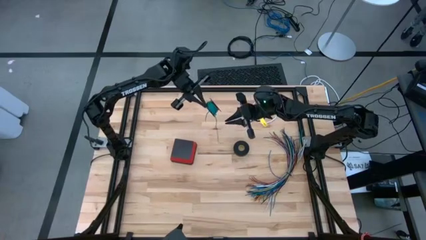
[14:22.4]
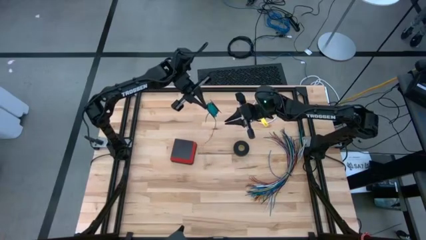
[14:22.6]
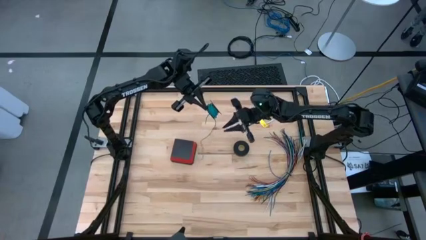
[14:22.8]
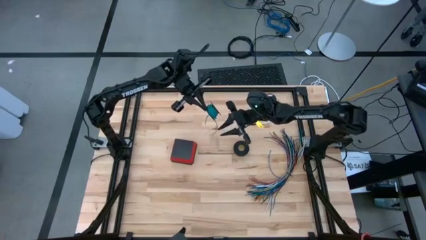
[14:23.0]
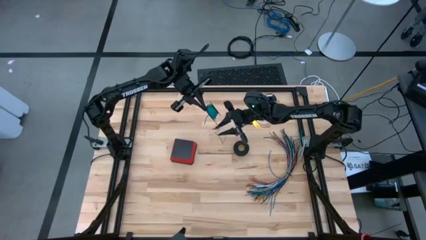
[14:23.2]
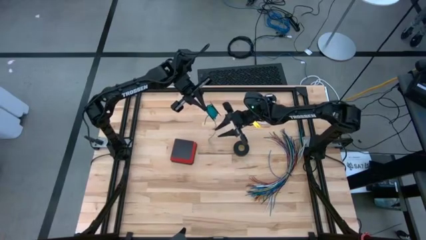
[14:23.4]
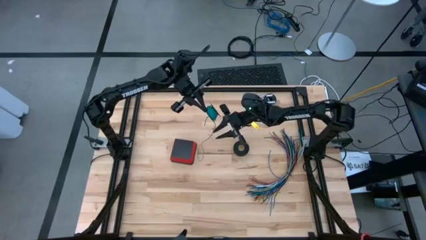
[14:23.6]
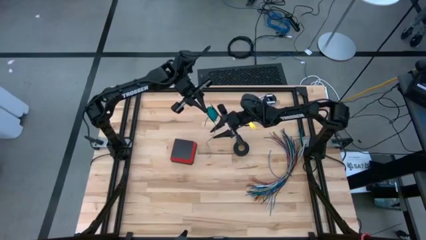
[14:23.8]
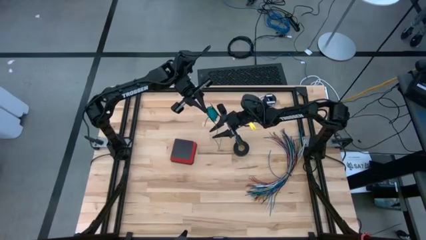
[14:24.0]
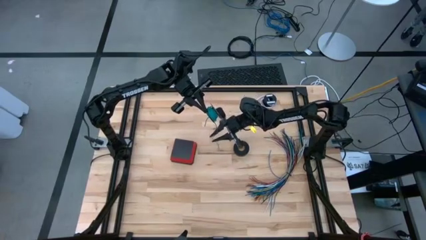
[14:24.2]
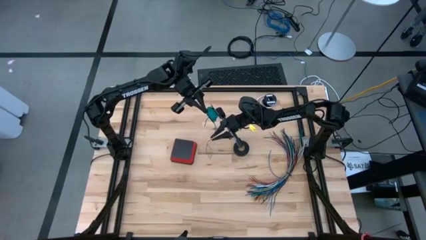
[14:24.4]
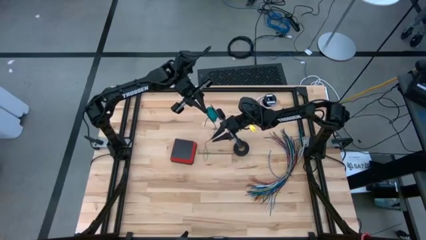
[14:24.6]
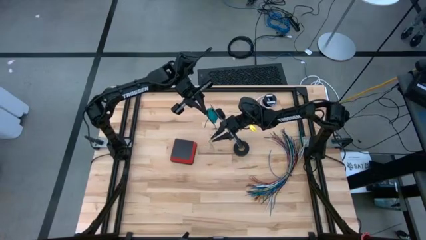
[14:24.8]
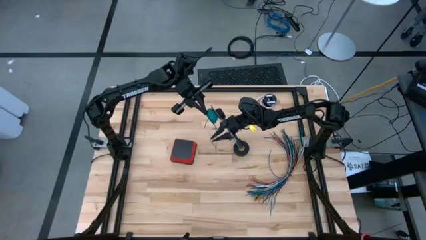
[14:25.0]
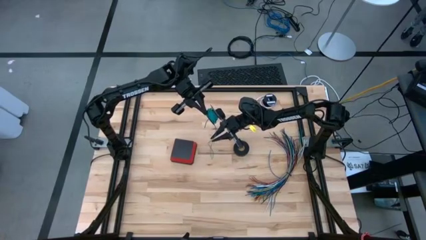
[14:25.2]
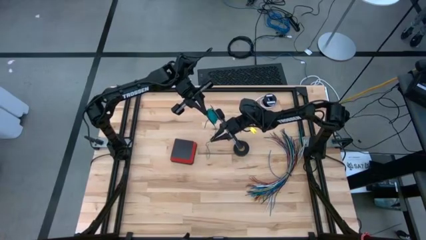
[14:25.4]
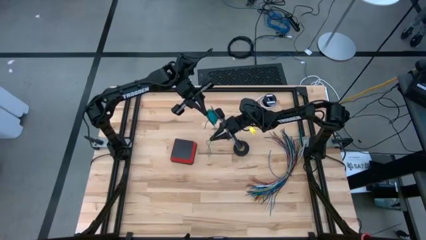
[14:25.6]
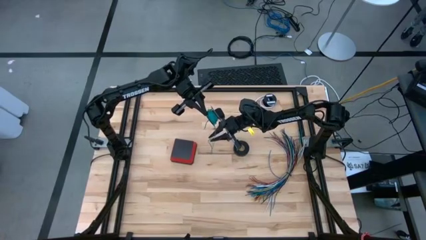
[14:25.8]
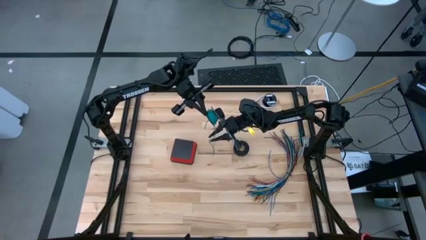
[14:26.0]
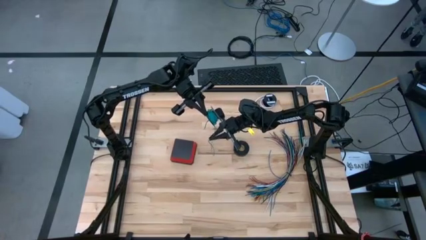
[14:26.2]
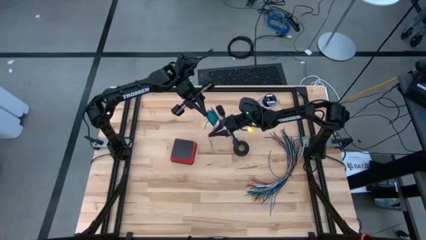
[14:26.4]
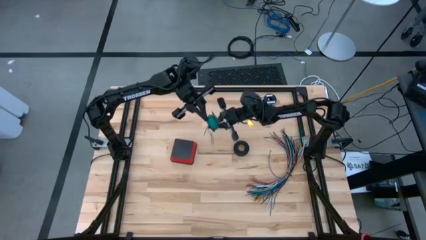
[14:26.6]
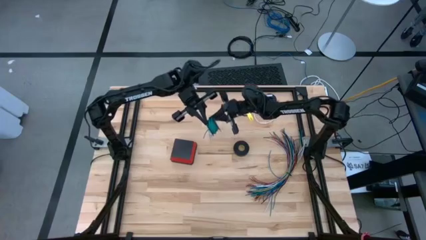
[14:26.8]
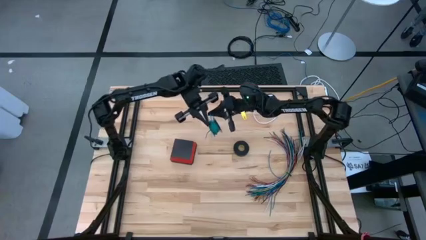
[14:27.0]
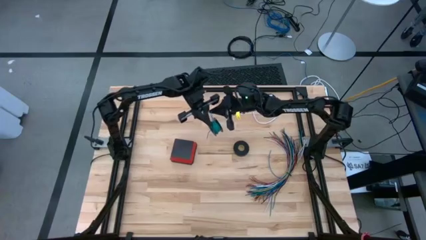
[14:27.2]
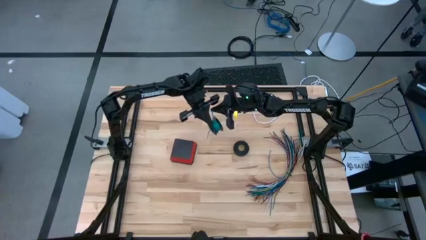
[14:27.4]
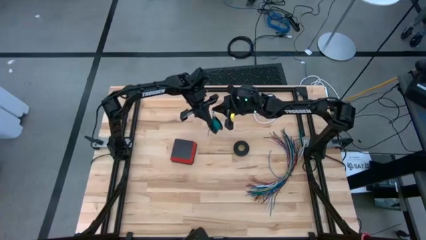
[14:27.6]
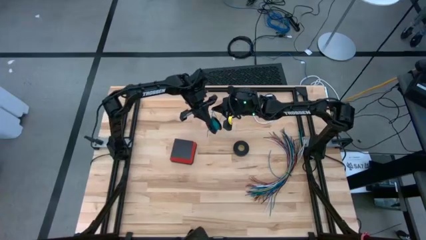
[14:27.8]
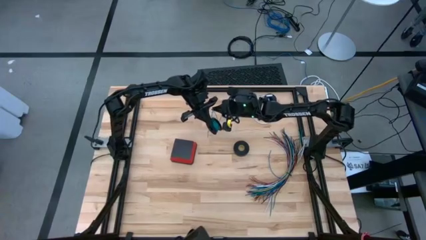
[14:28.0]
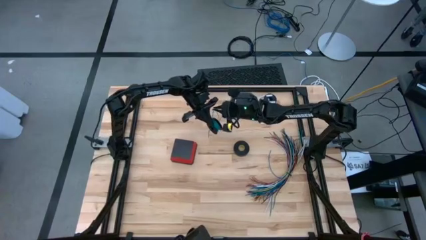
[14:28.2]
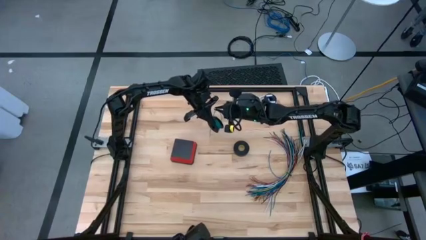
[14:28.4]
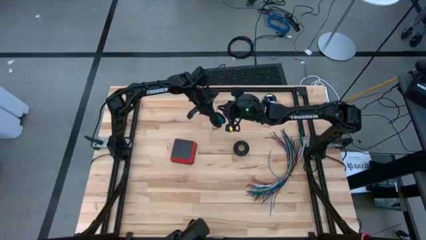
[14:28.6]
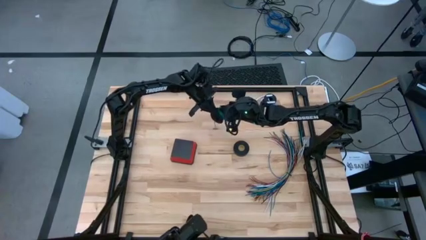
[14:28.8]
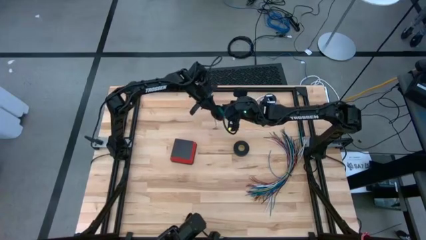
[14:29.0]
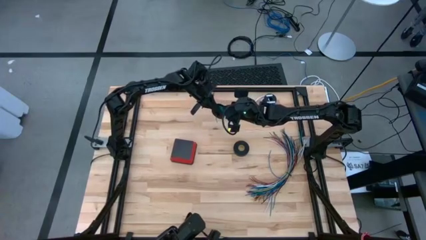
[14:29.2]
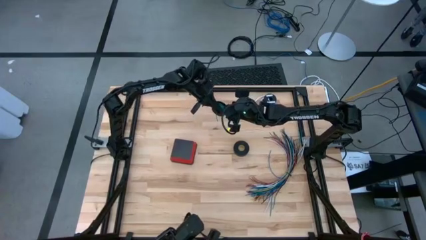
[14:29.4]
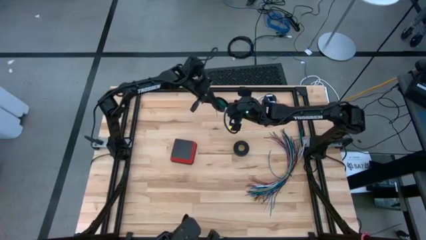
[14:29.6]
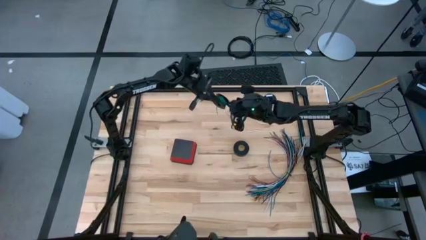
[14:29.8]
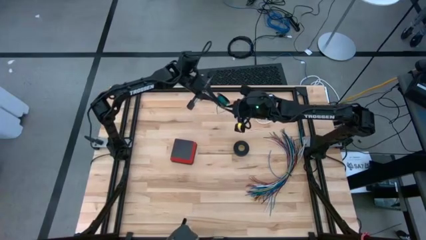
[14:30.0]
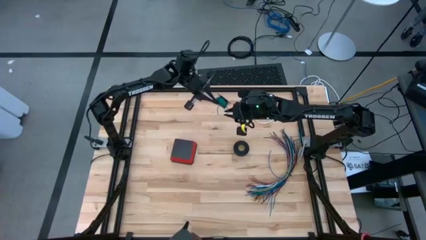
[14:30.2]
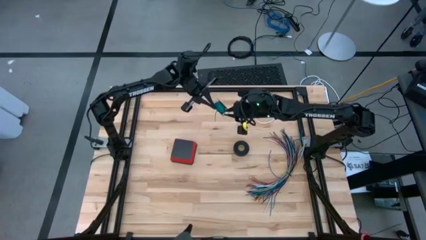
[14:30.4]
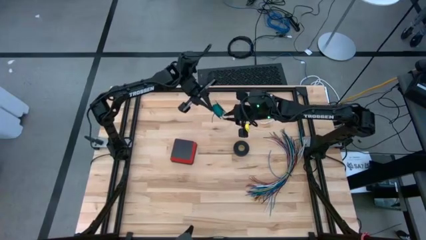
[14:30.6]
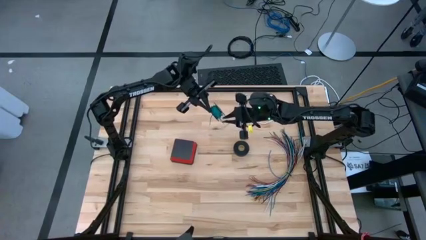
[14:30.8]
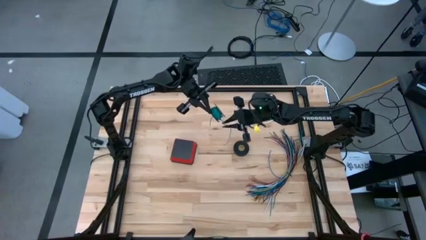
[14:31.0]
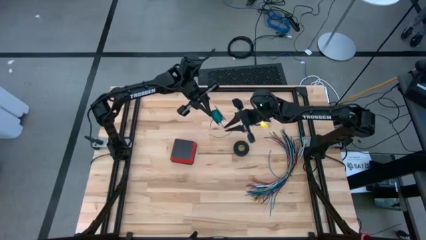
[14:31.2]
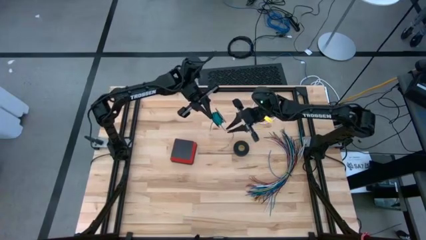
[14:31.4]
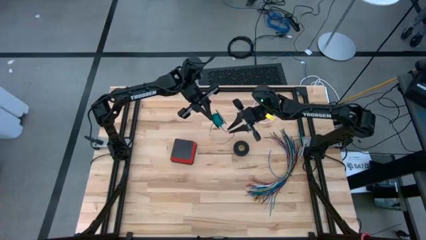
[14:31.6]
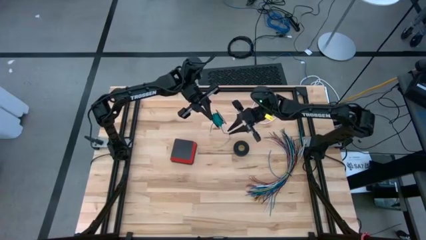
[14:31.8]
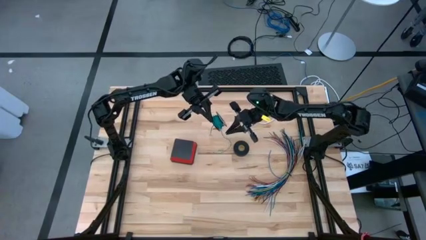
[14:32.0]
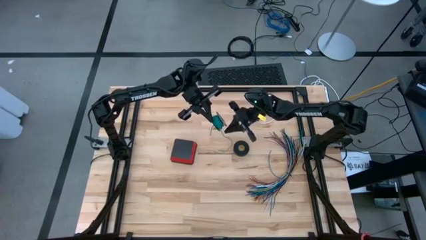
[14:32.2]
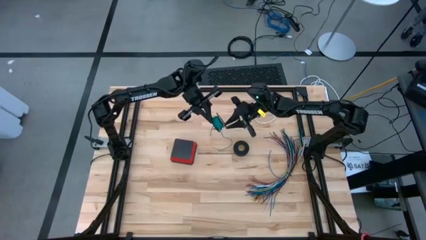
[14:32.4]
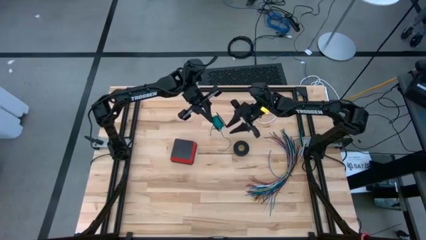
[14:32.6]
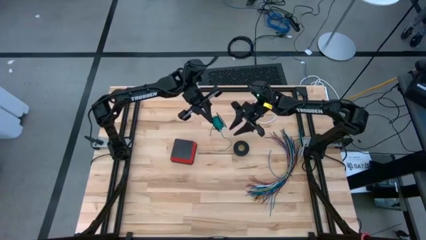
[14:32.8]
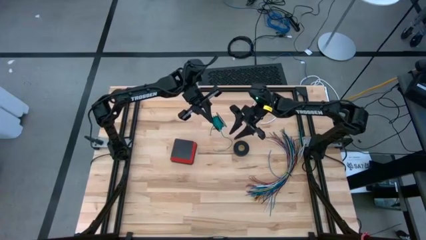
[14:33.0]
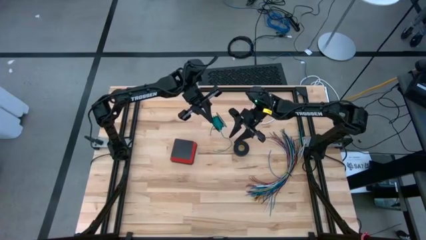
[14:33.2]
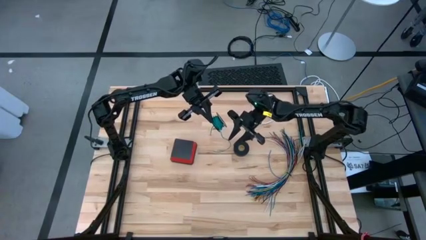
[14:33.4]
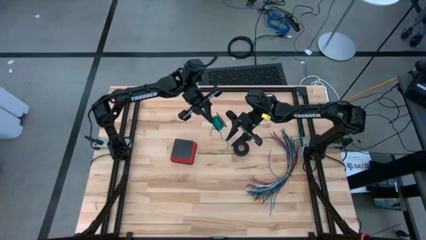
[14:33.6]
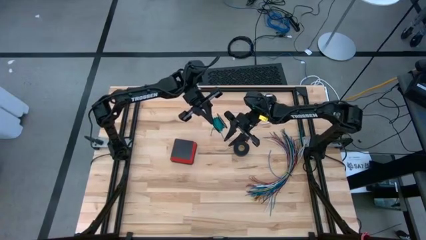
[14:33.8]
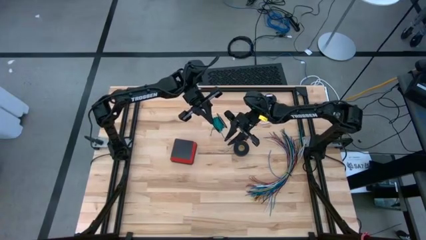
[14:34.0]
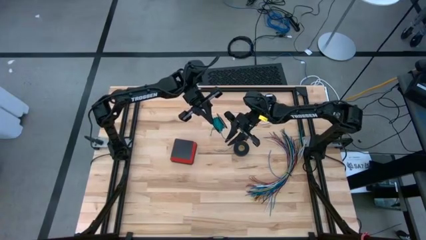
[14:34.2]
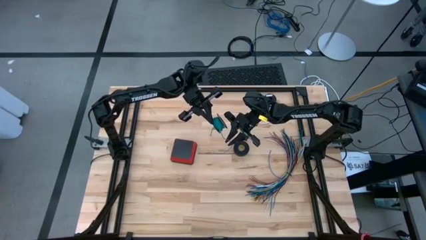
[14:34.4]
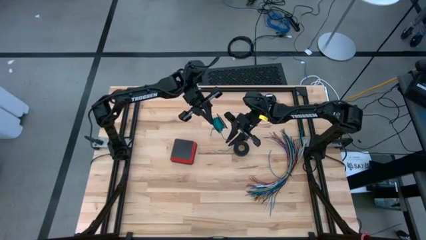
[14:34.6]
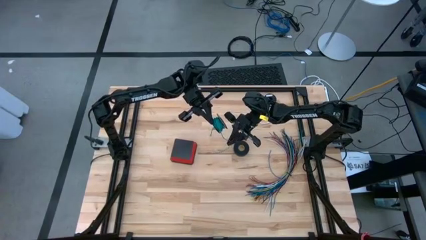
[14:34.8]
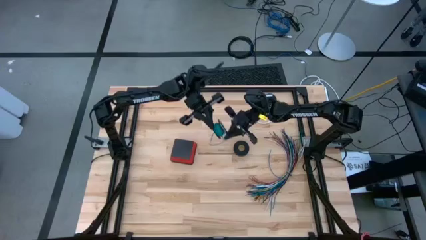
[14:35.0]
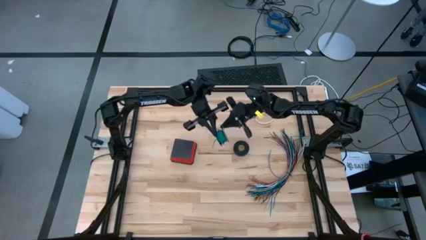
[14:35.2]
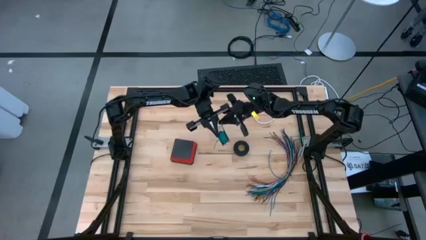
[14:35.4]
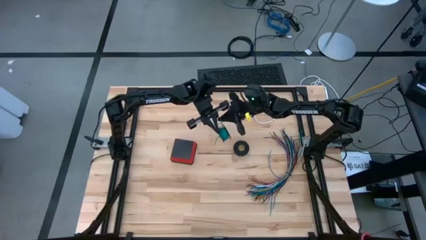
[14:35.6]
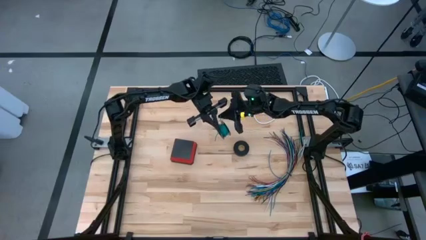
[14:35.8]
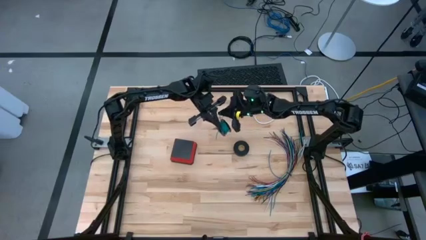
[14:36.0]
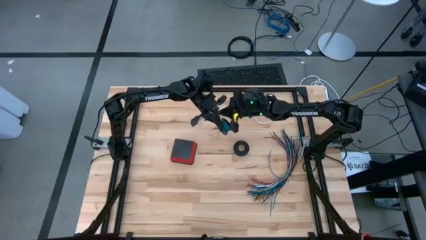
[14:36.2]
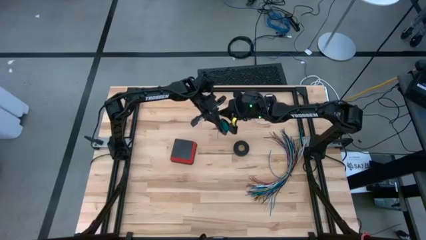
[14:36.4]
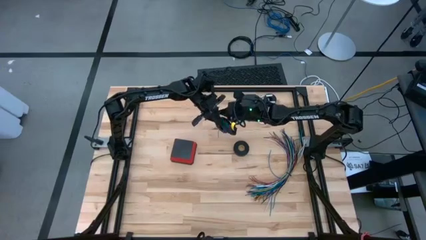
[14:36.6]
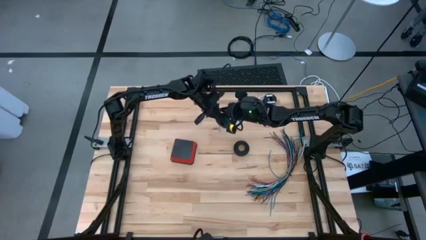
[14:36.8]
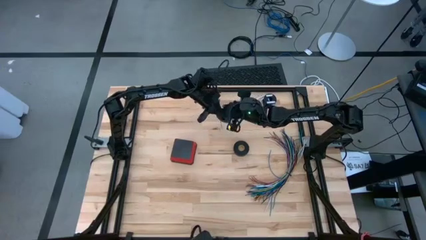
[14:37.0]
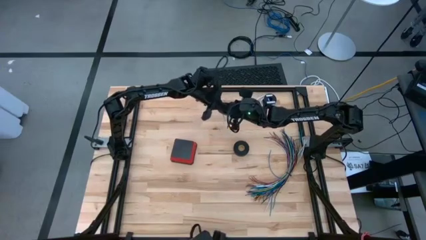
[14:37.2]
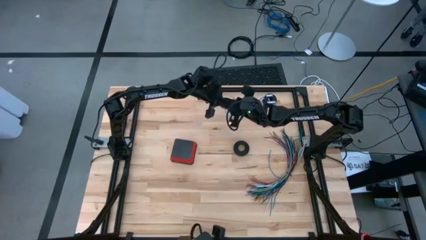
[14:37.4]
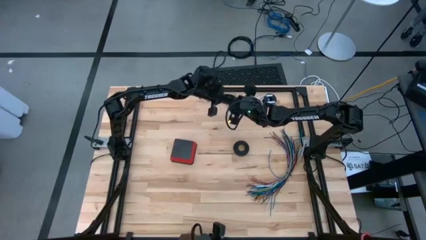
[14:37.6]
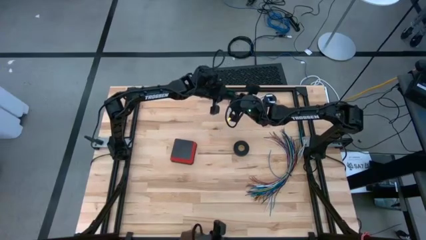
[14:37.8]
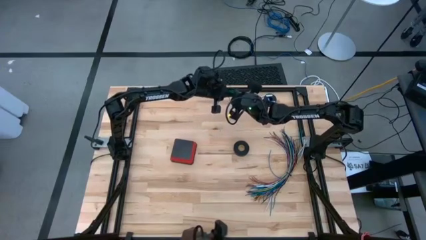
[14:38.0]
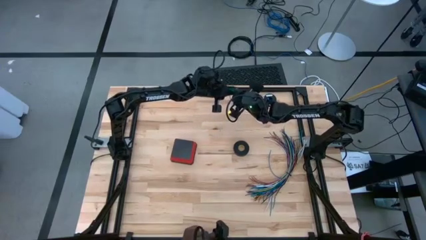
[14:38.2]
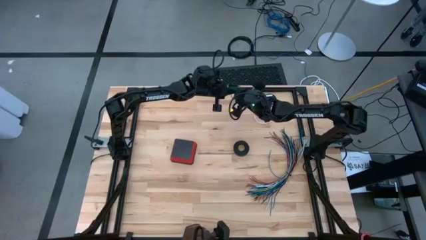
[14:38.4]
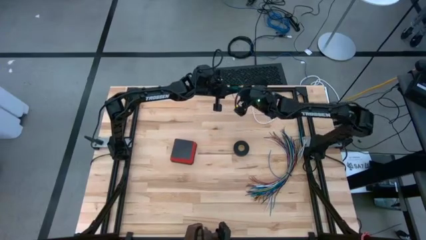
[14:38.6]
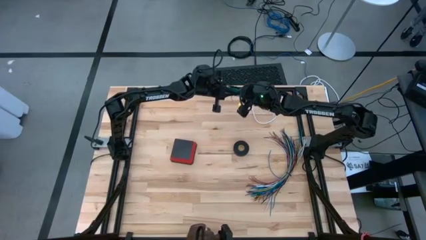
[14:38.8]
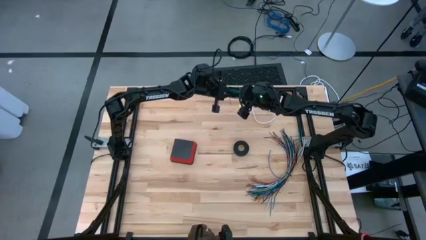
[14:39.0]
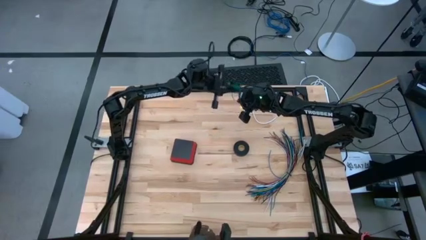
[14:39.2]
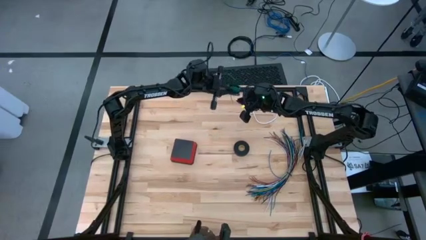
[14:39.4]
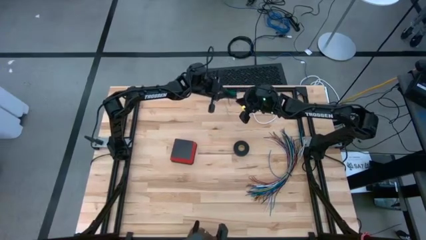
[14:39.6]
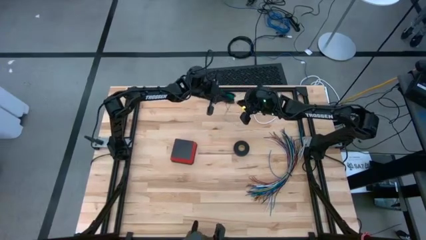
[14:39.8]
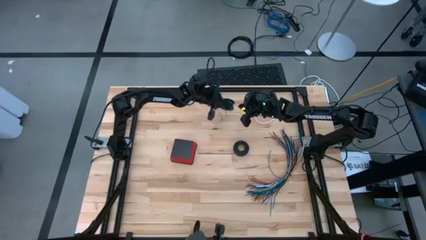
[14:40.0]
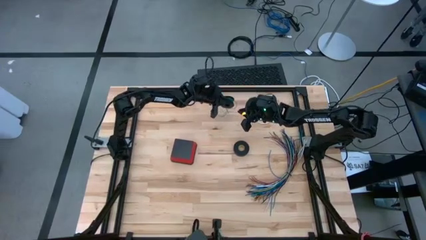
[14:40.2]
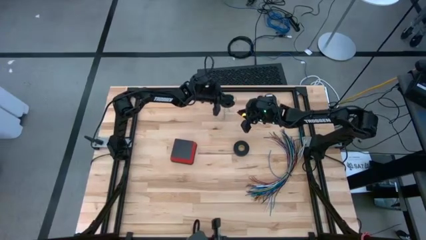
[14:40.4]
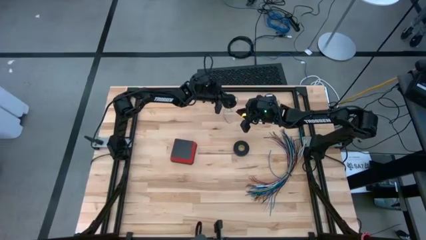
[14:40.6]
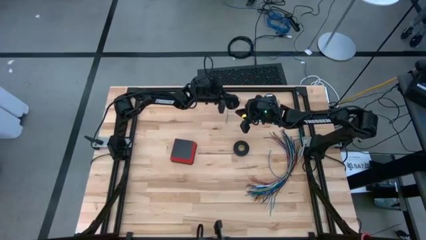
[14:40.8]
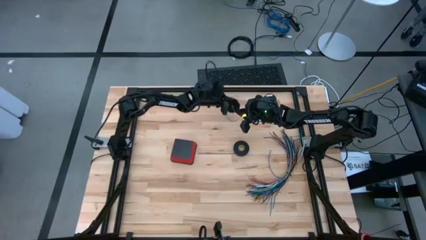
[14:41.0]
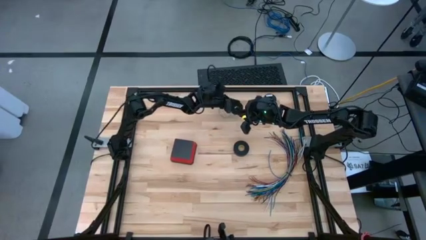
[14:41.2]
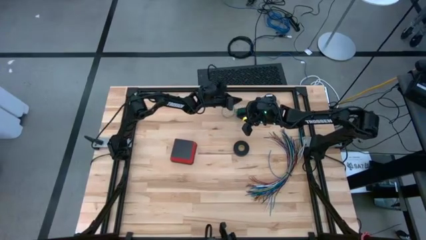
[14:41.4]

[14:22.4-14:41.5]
Task: Coiling cords
Coil the green wire cable on the spool
